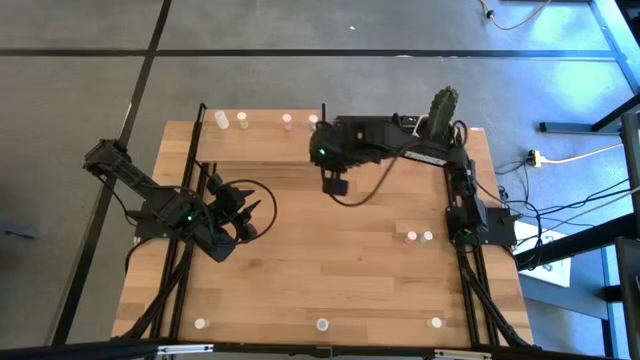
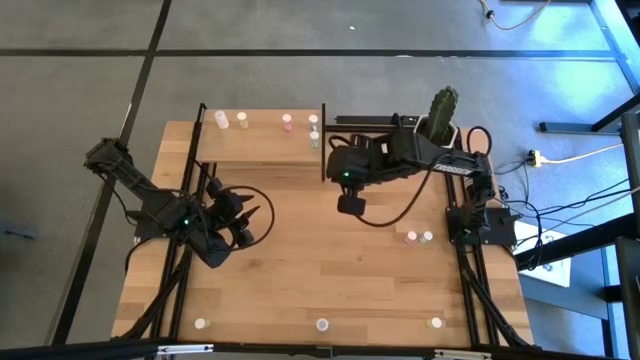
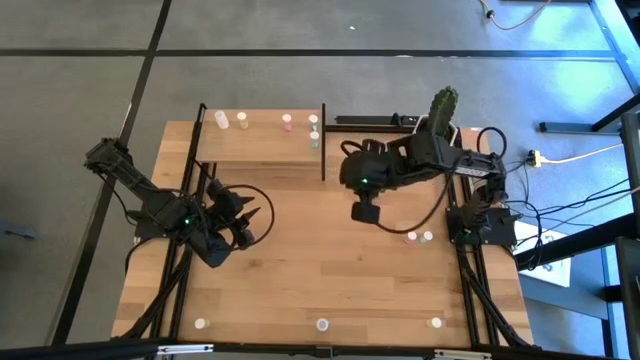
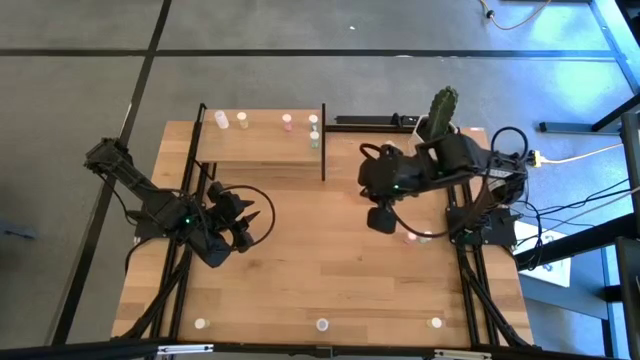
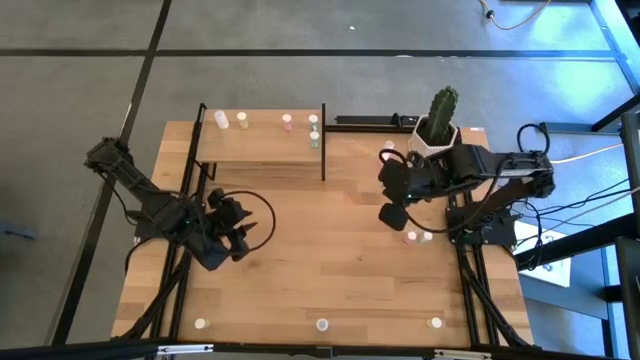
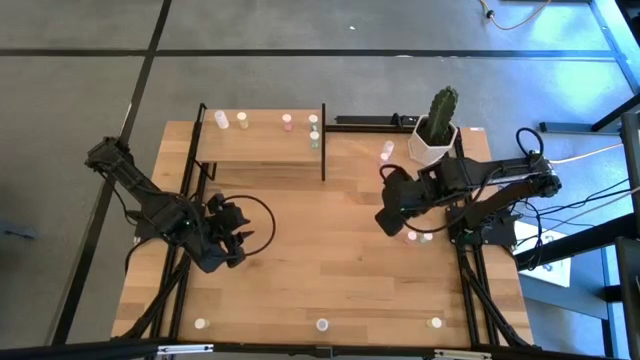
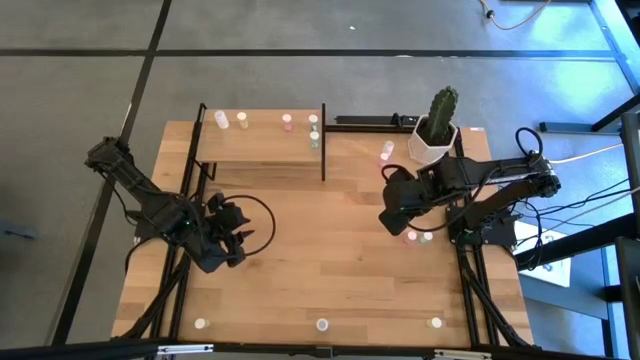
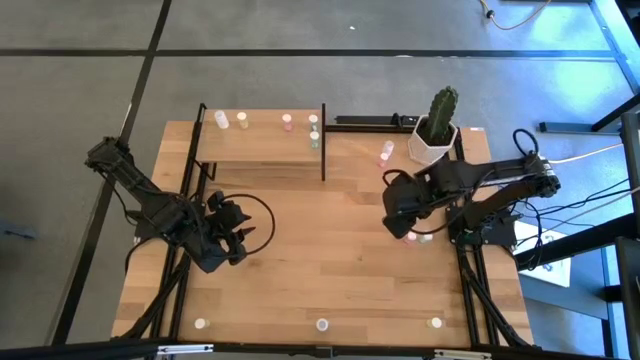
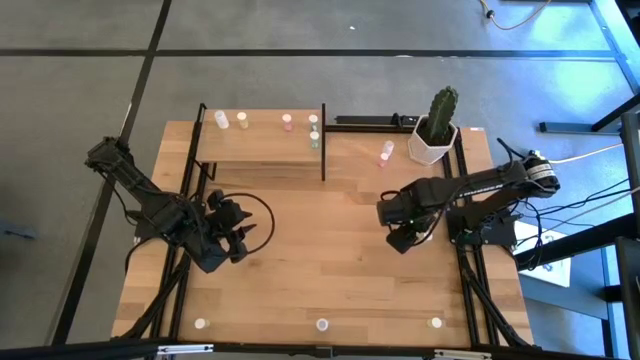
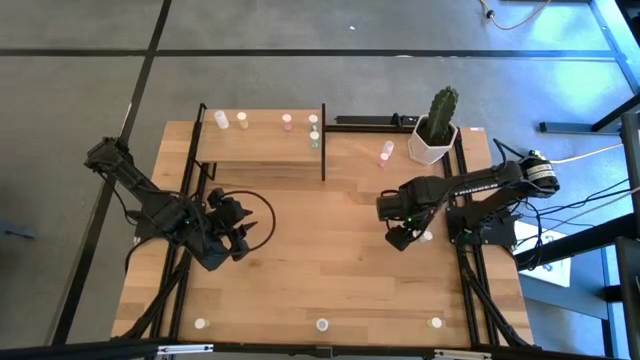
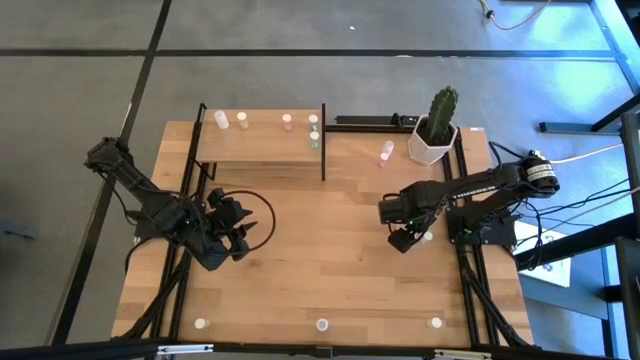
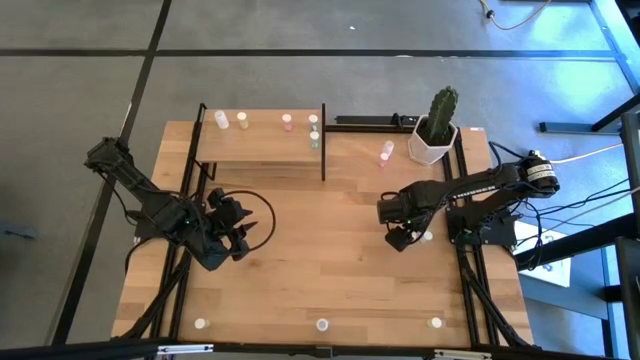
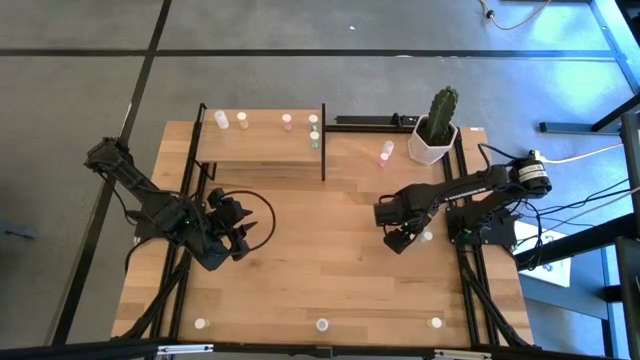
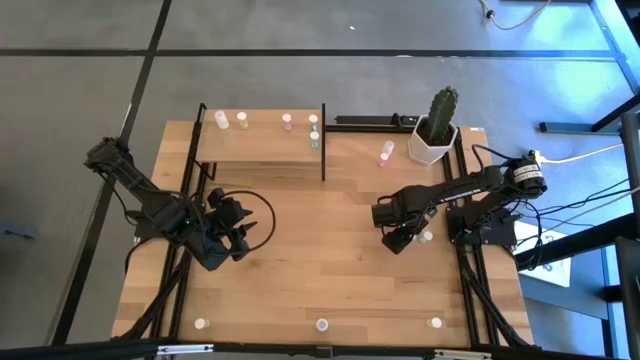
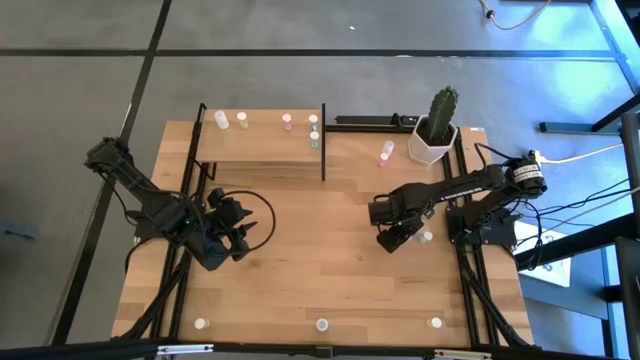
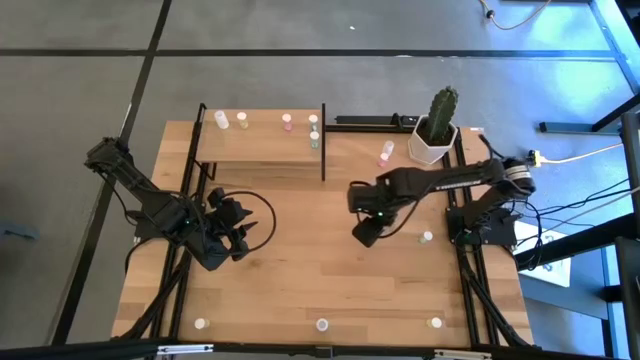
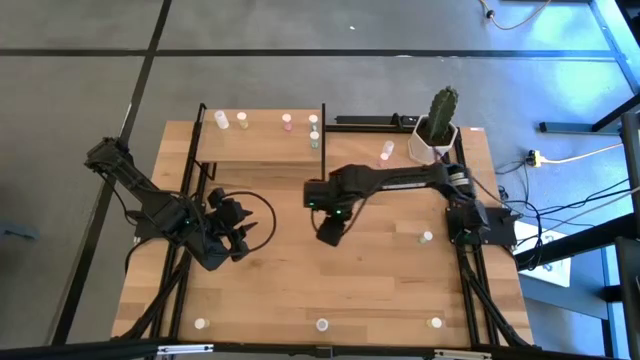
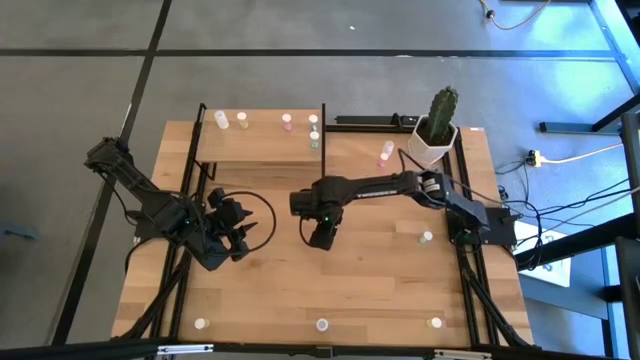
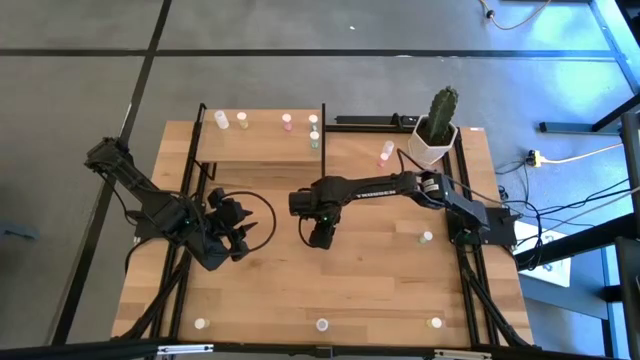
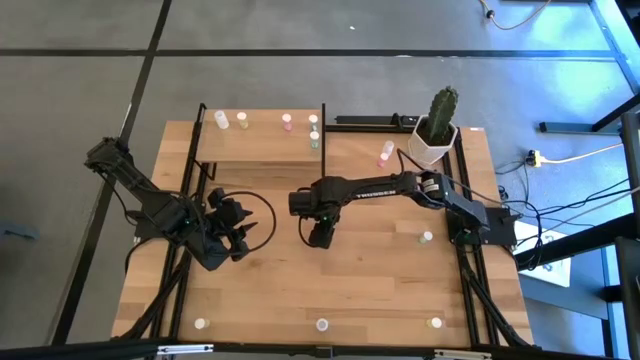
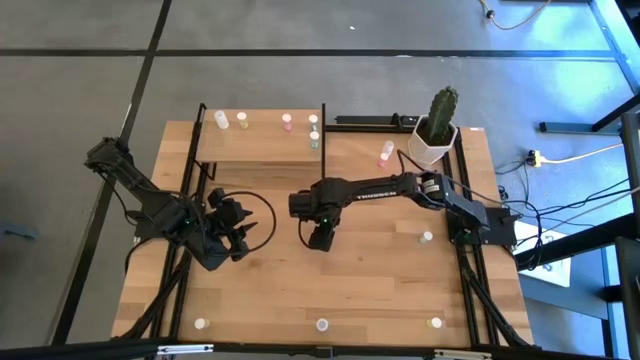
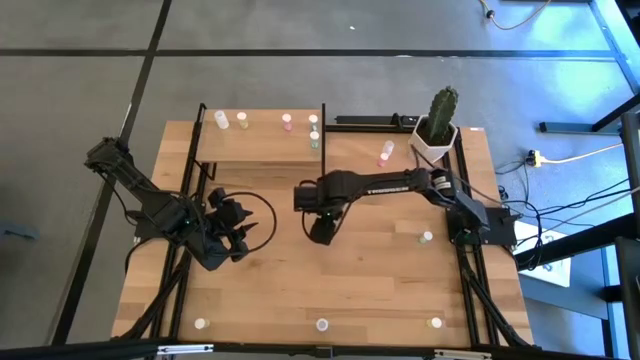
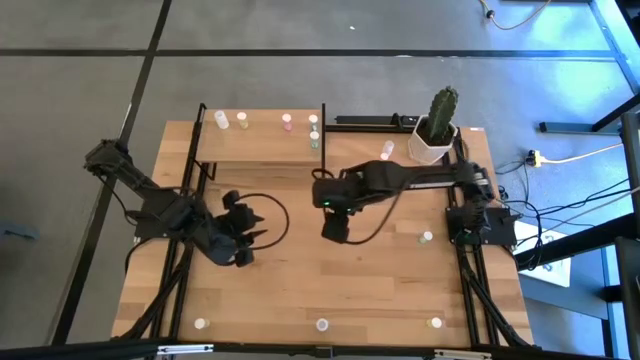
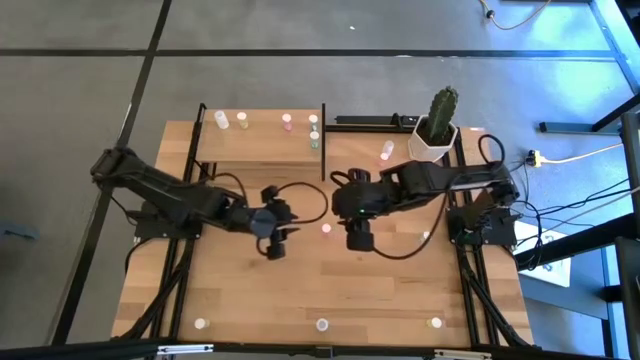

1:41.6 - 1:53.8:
Task: Pick and place medicine bottles onto shelf by color
Put the bottom pink pill bottle on the shelf and align it with the other pink pill bottle

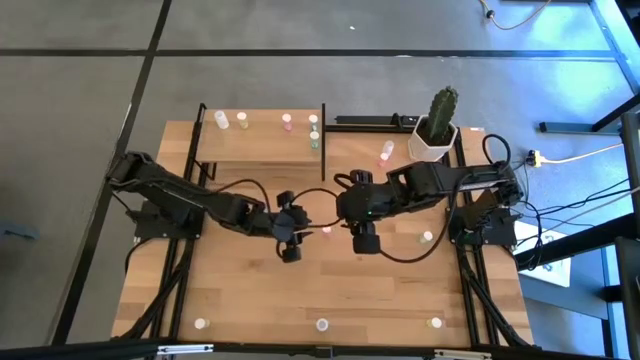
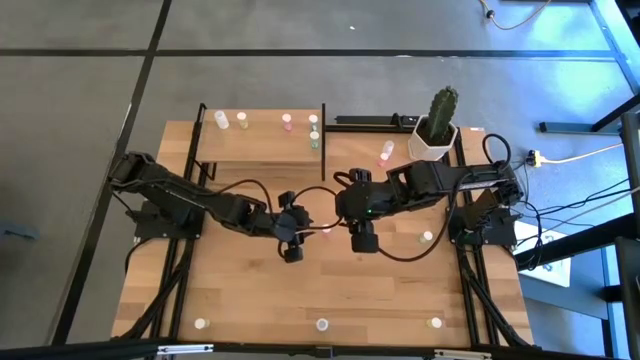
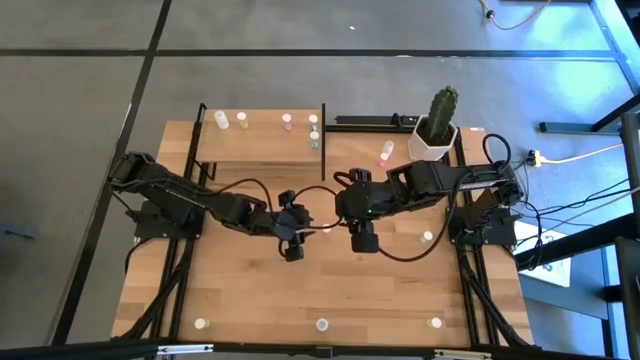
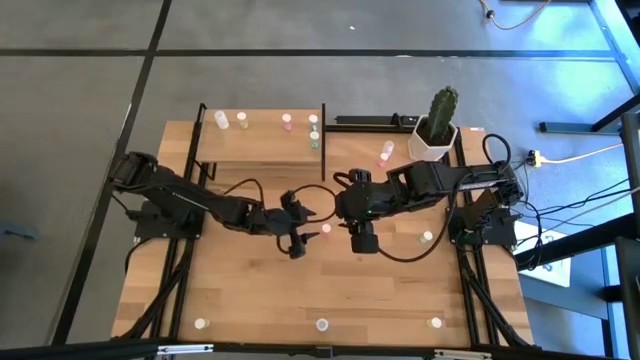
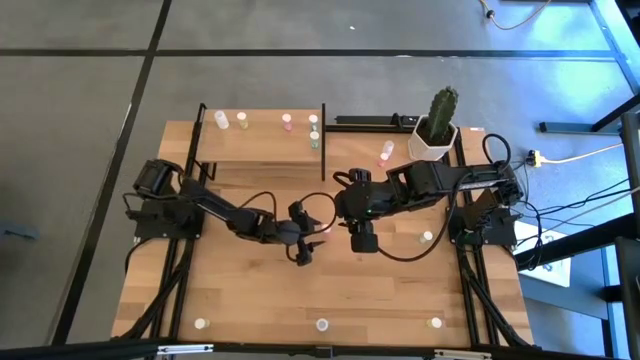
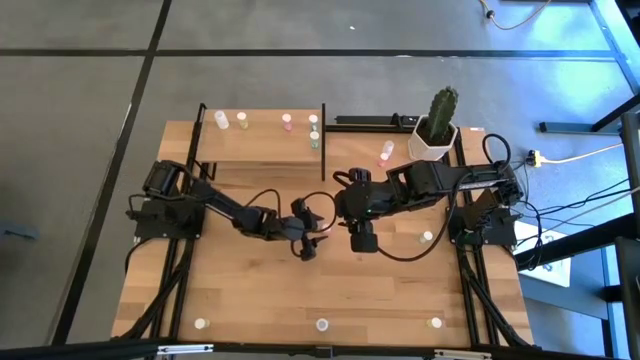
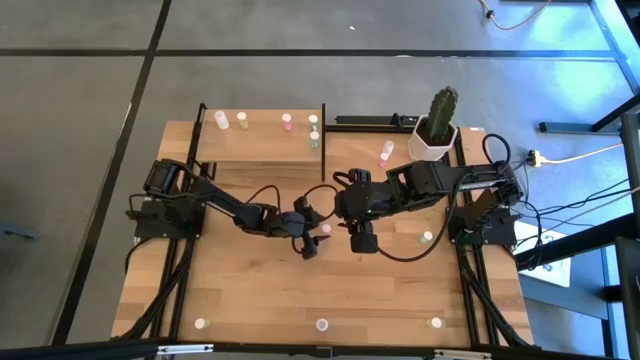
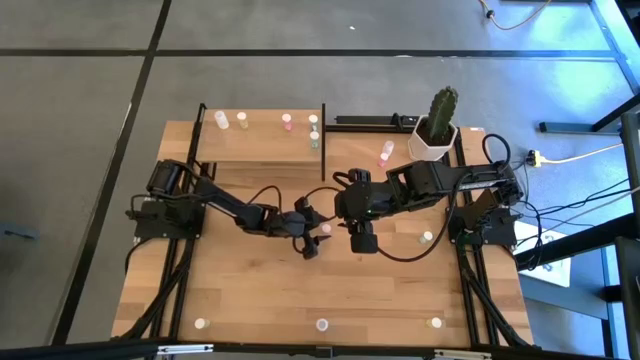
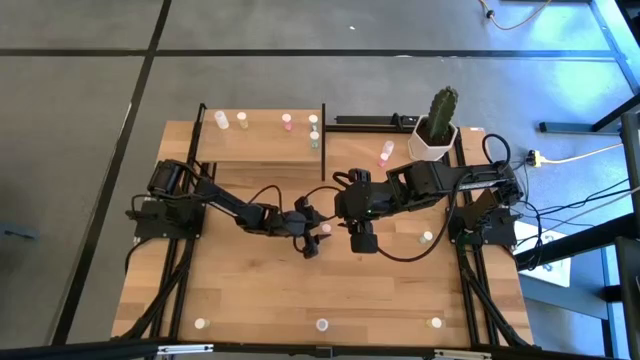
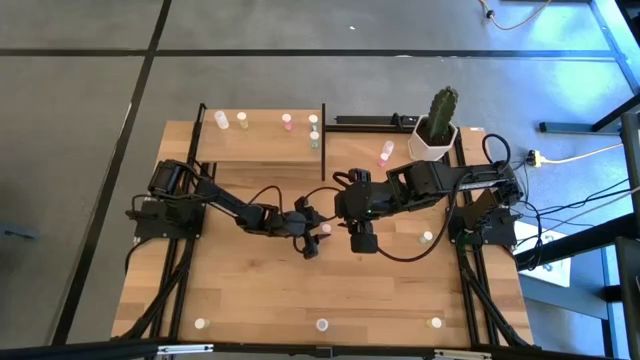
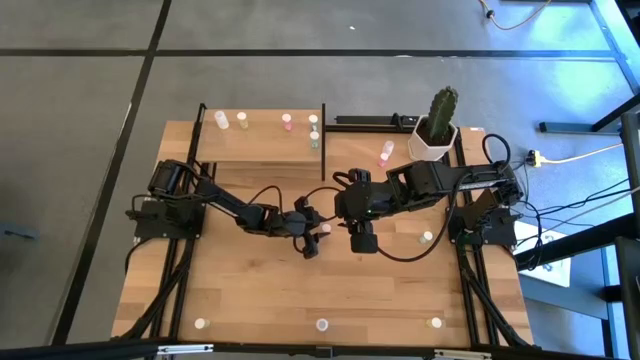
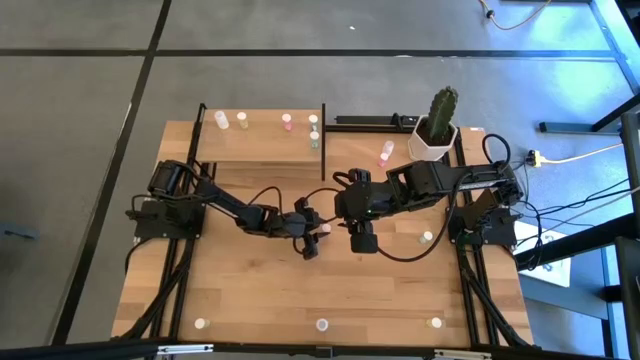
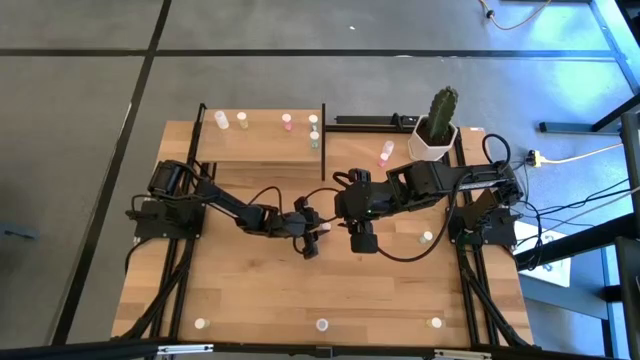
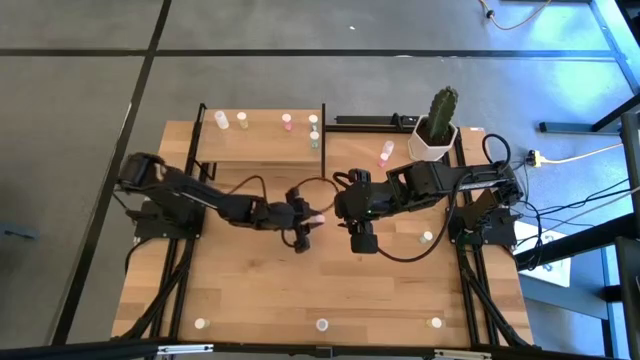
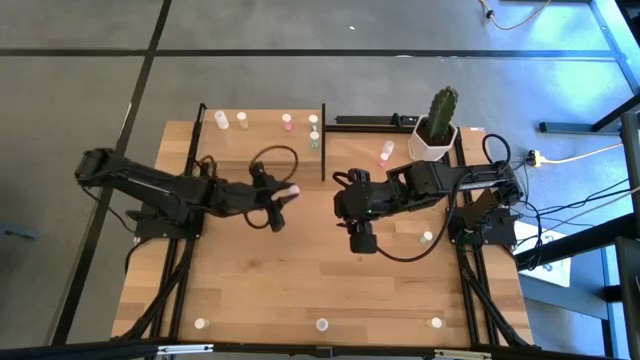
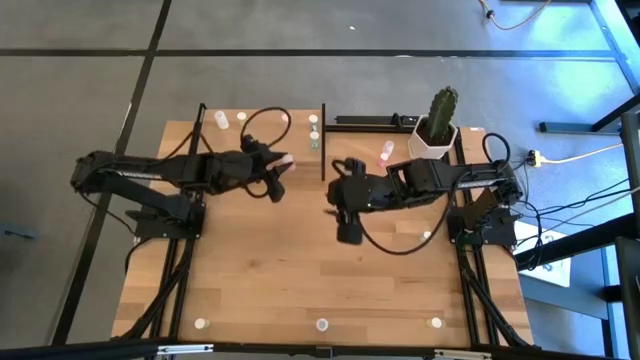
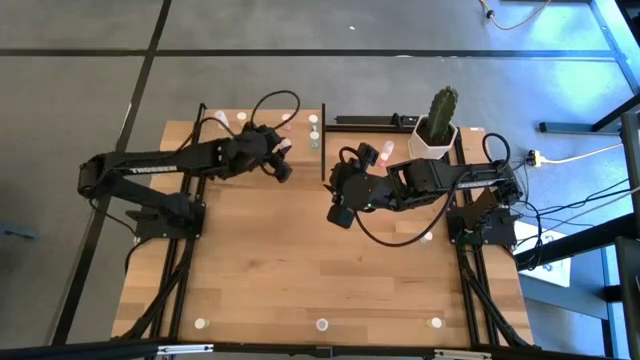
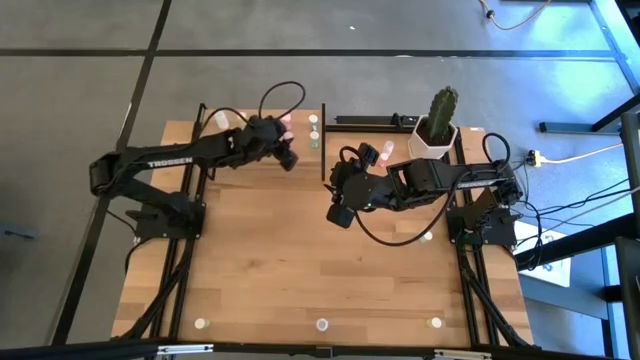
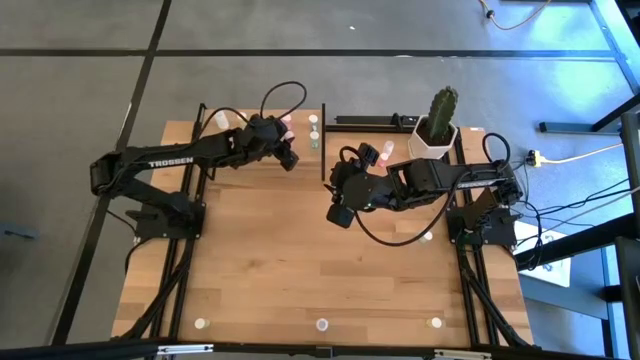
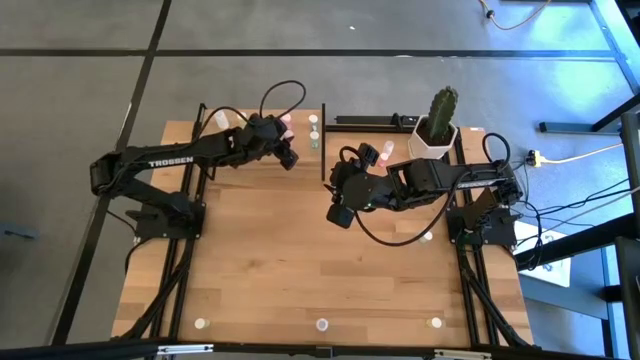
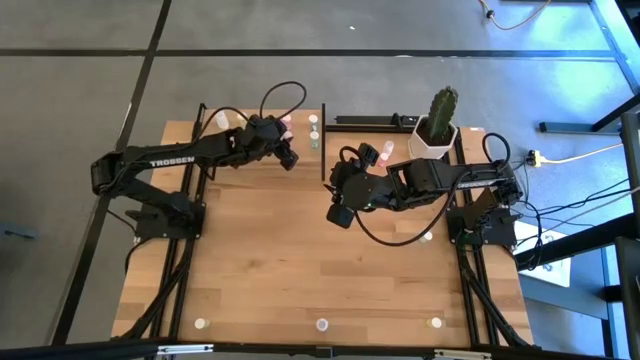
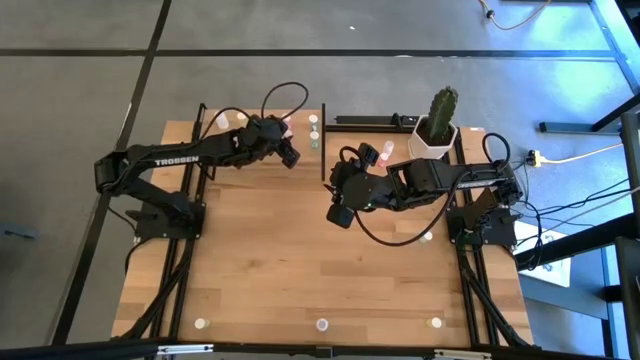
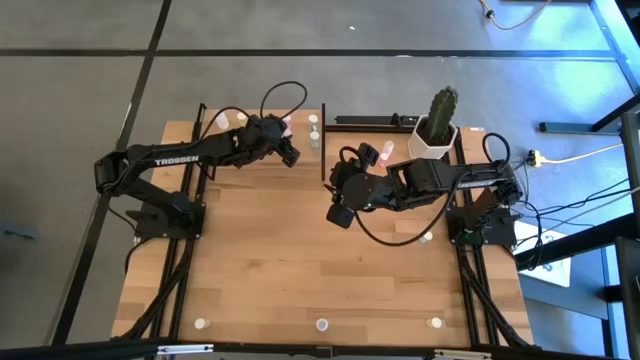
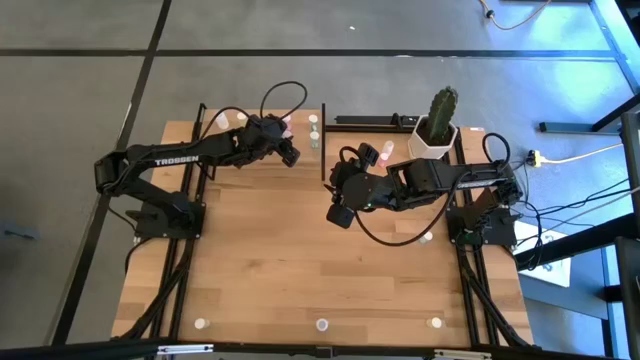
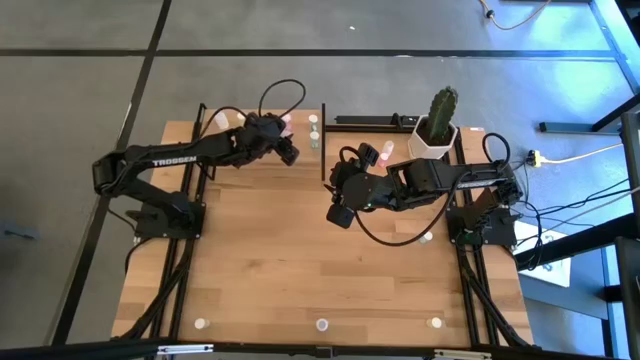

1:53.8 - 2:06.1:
Put the bottom pink pill bottle on the shelf and align it with the other pink pill bottle
